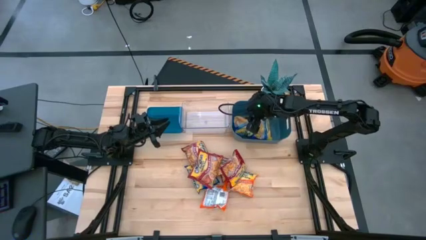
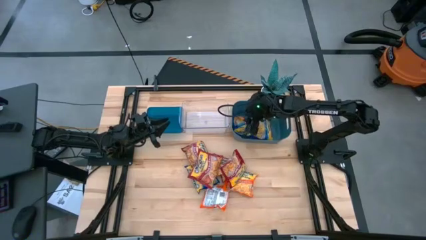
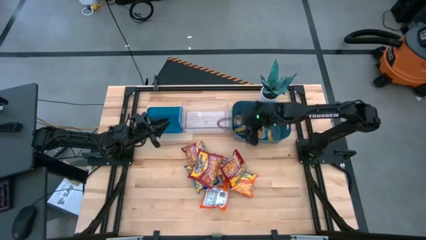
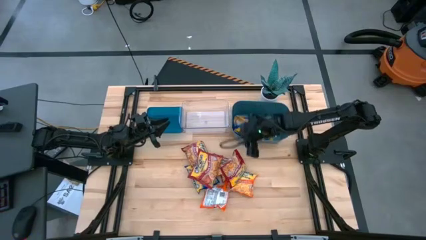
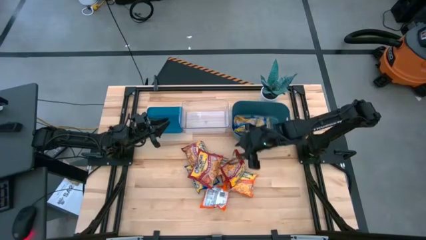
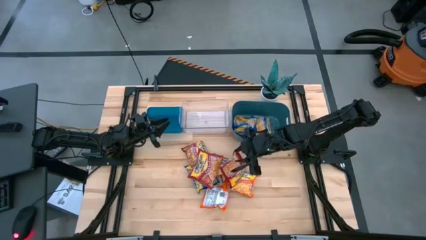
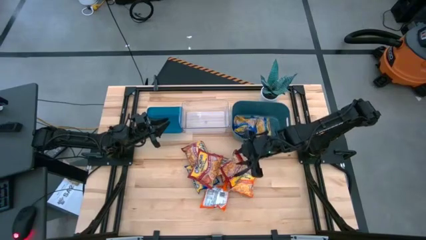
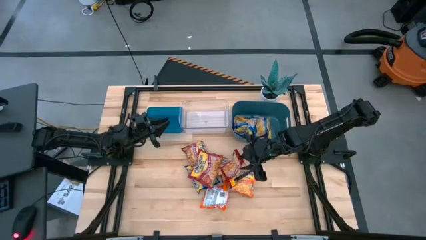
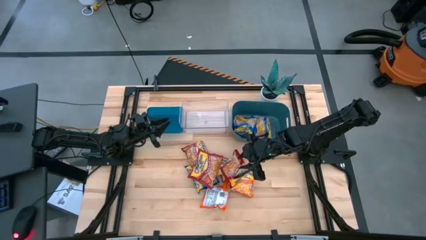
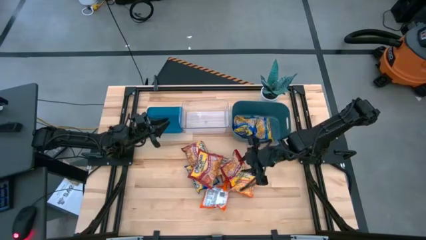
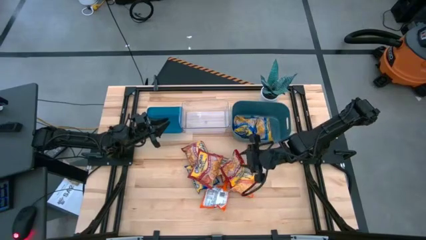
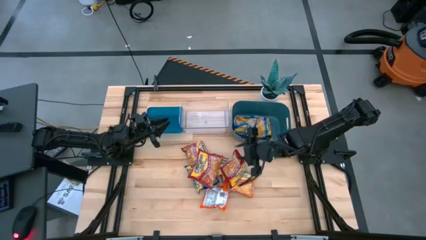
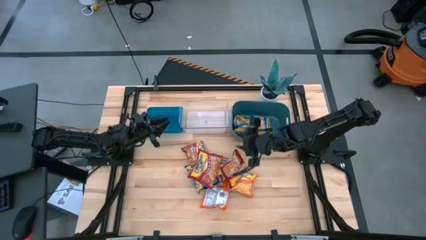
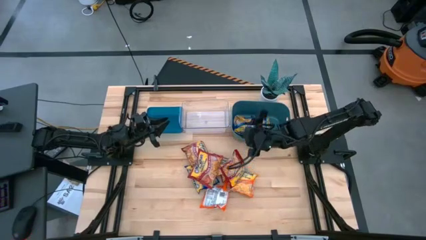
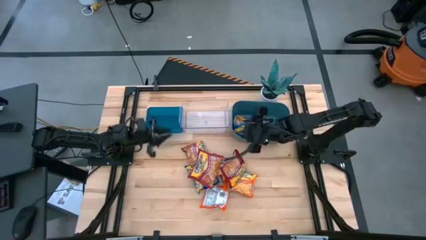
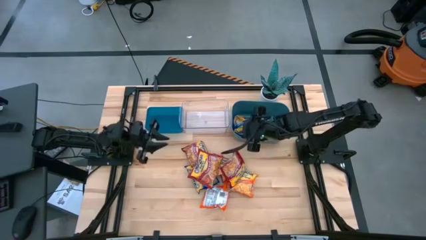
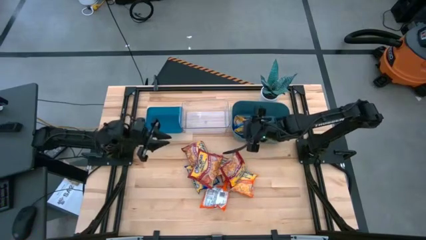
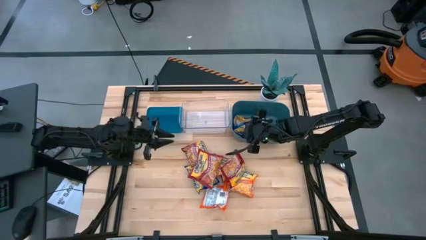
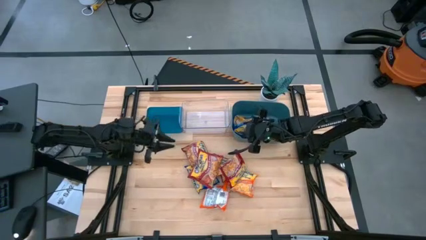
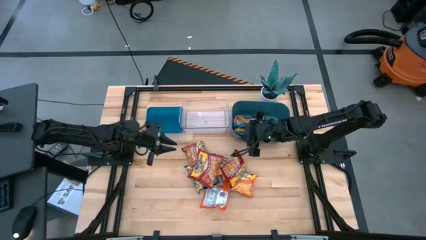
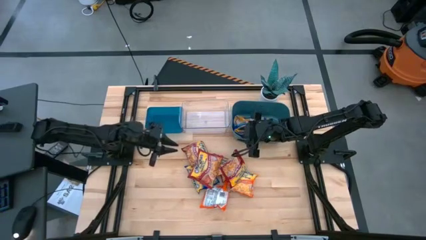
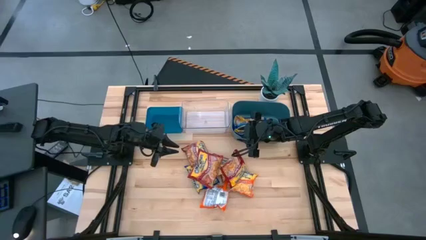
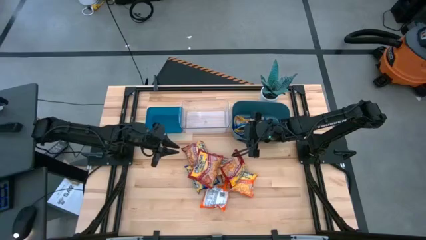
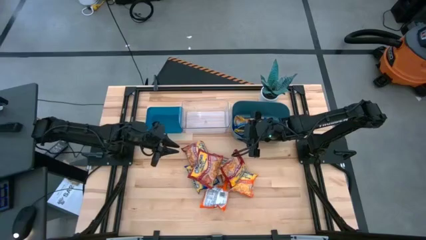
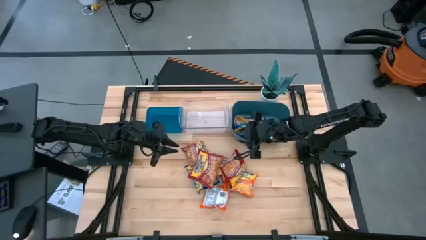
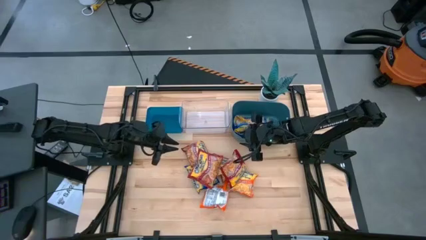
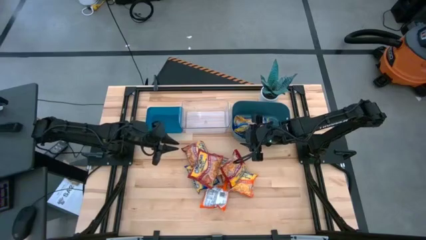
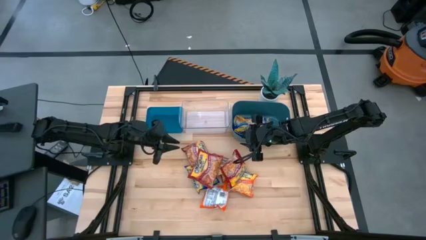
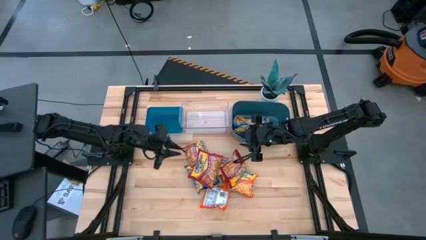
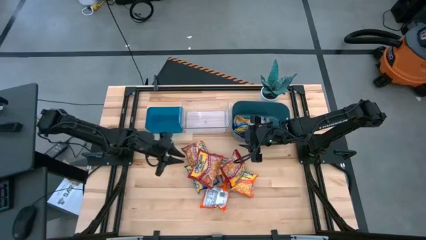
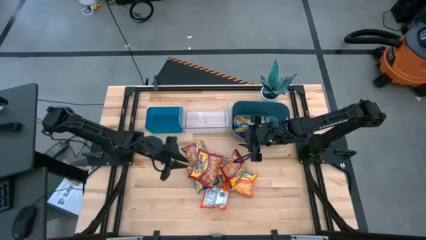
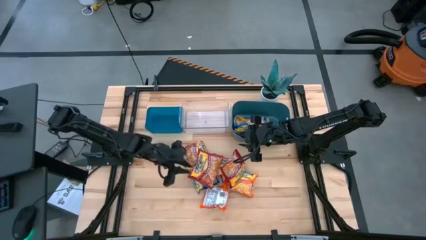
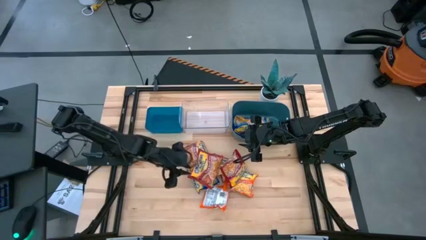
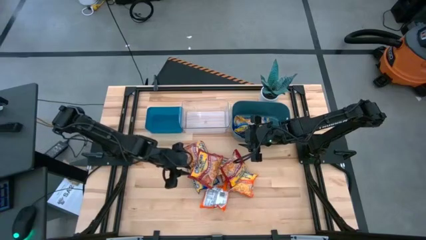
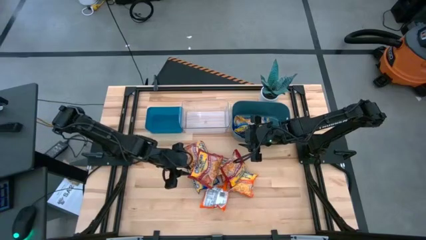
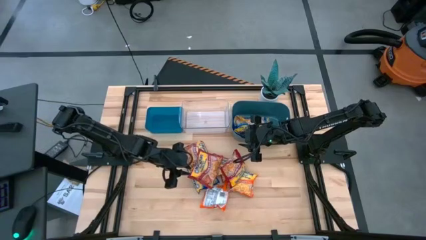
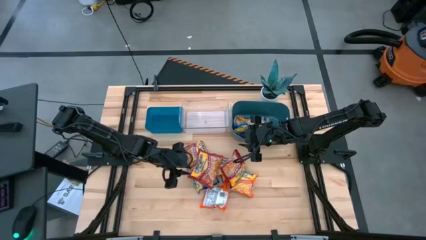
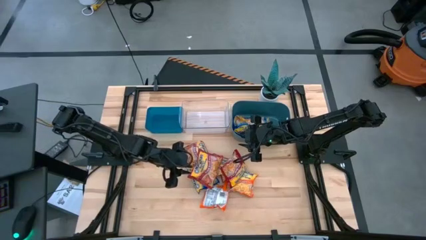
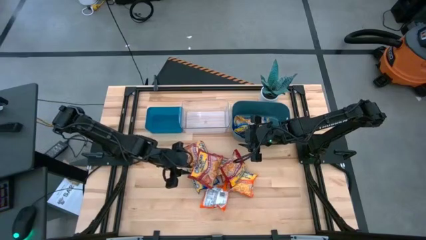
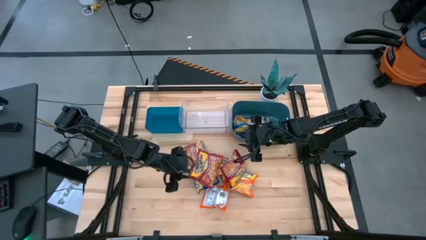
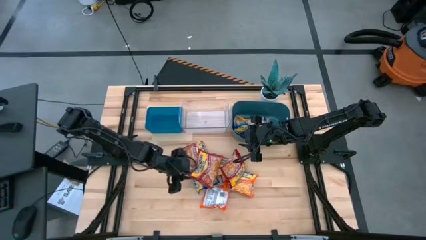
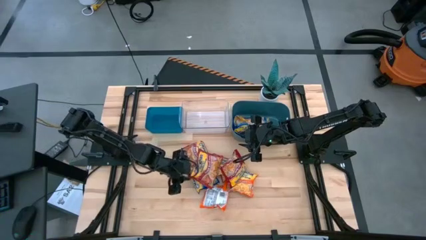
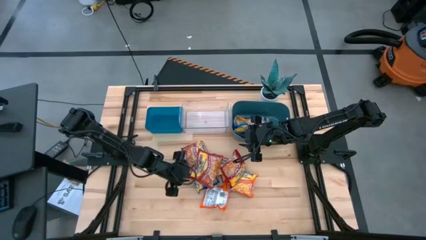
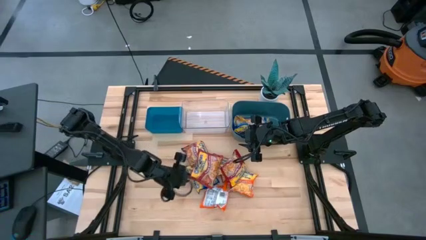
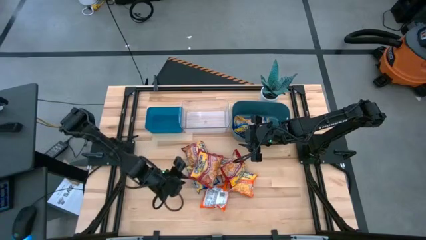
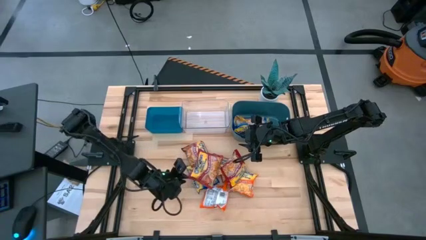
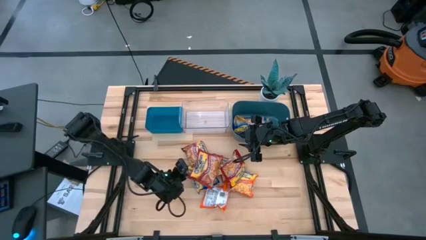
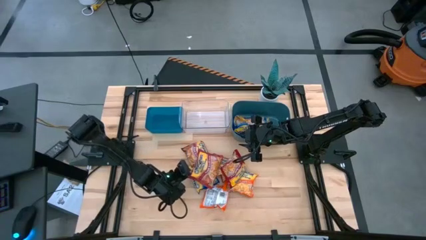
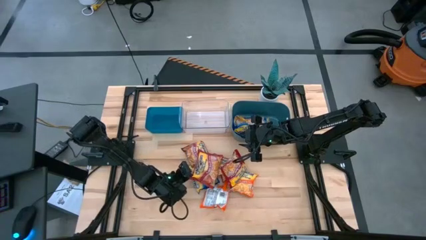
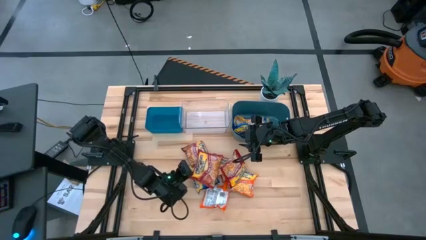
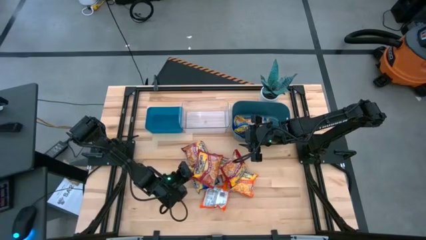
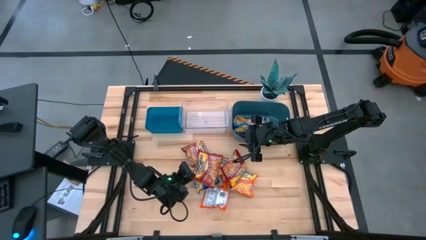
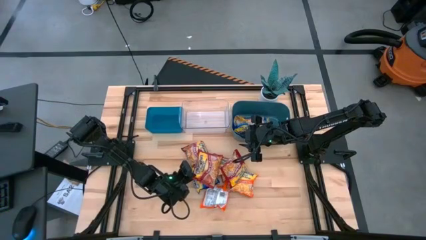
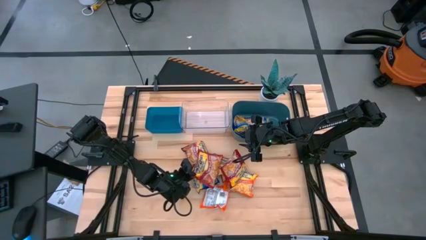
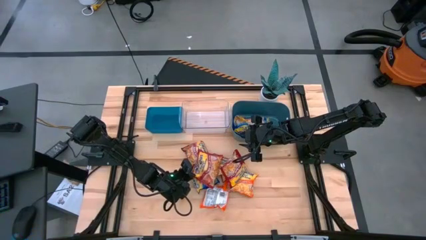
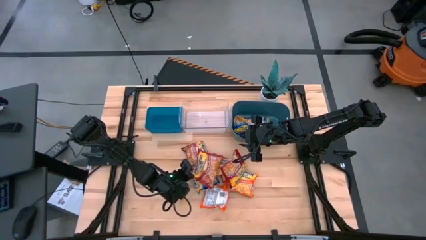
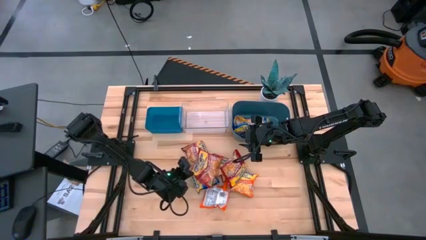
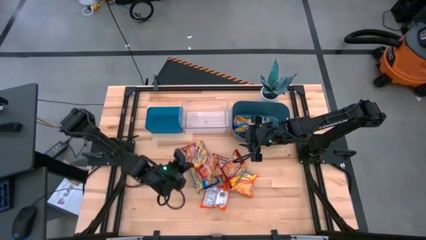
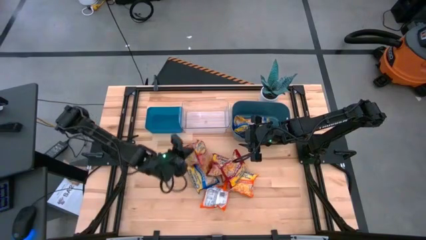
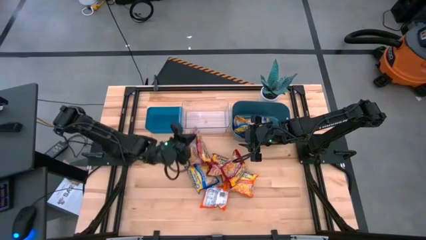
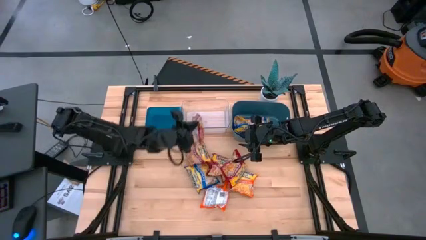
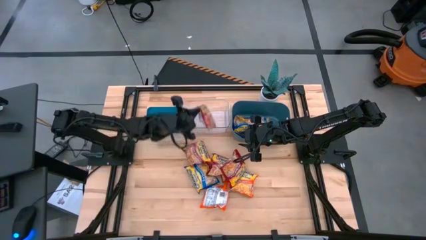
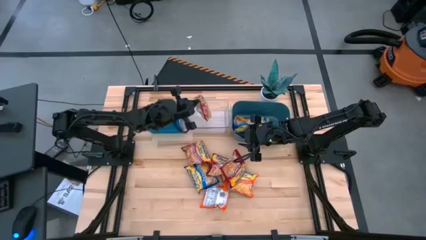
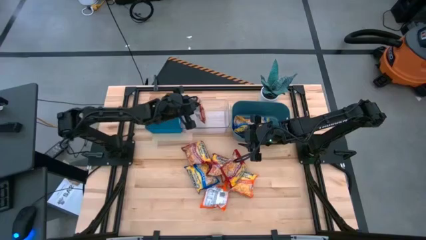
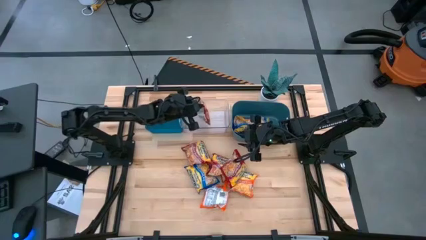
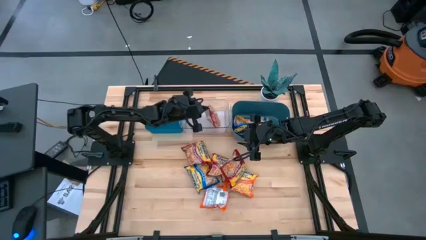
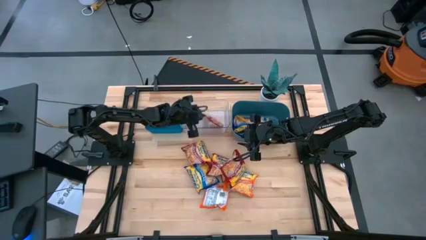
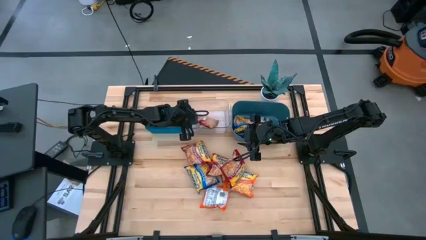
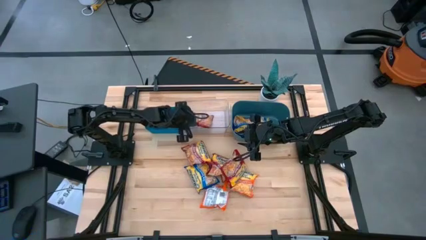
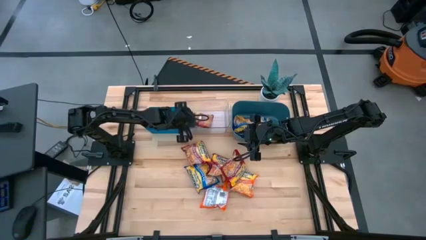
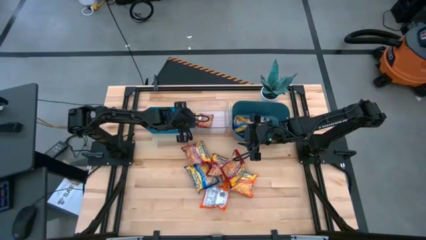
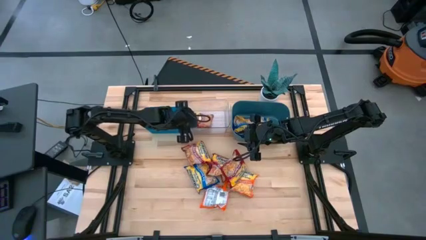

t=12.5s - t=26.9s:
Task: Sort Maruchan noodles
Put the red noodle pack into the transparent bin
